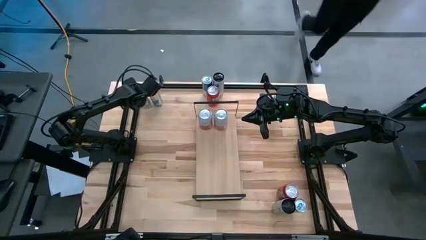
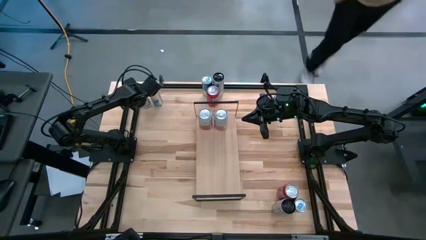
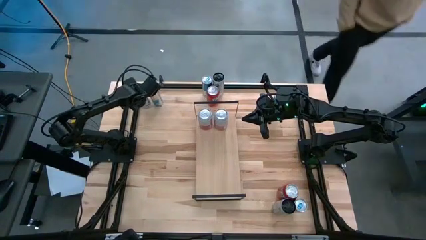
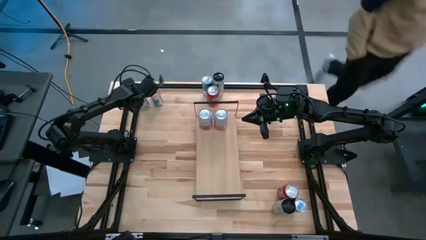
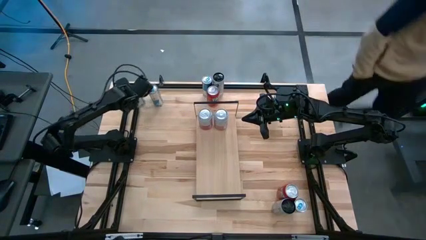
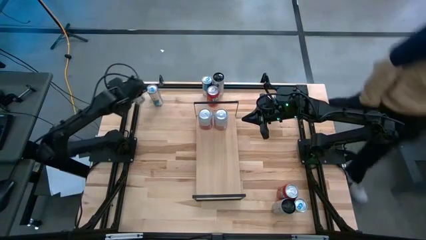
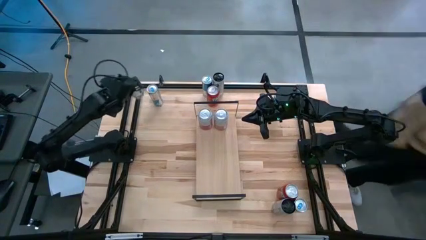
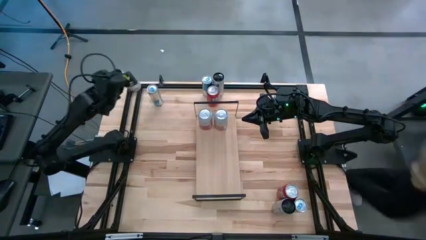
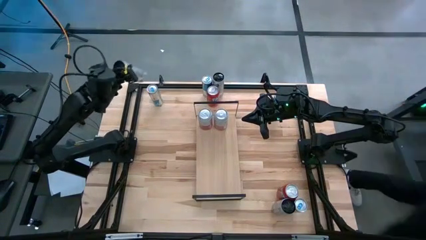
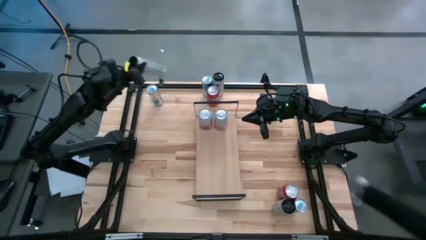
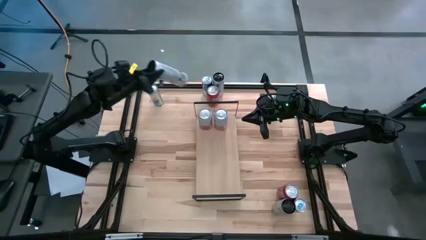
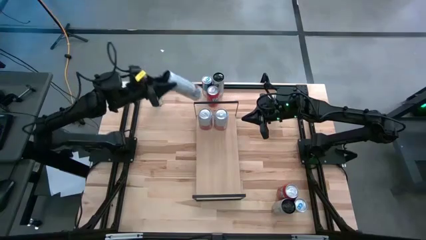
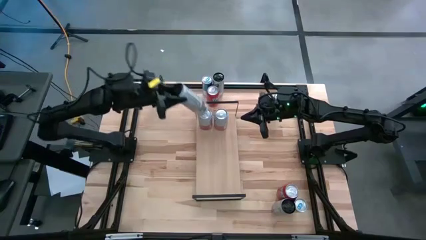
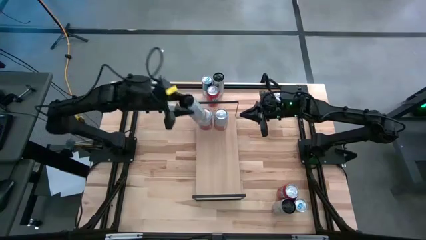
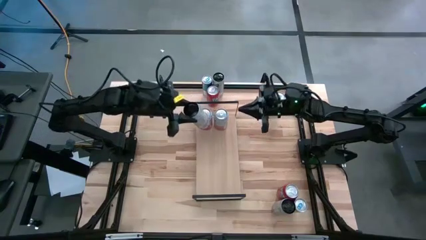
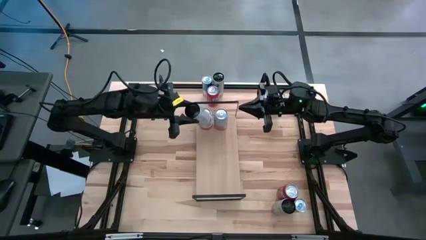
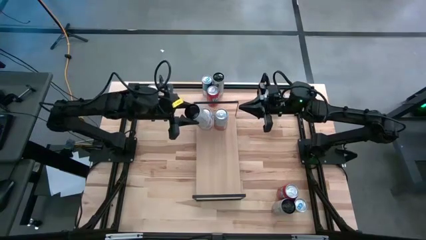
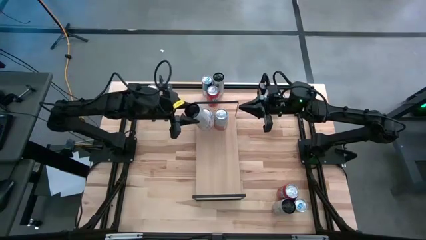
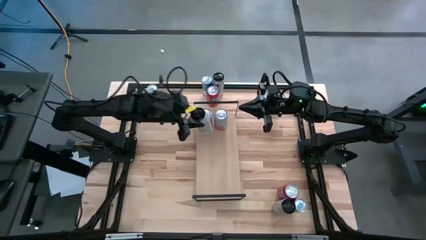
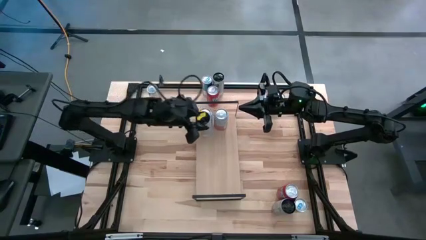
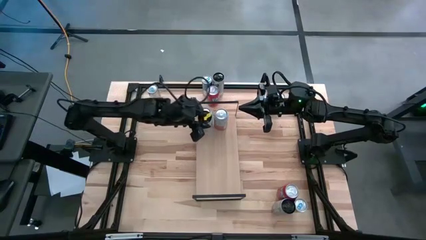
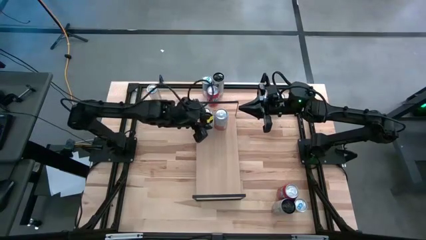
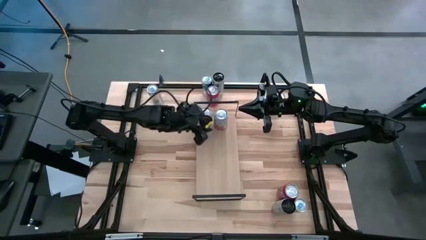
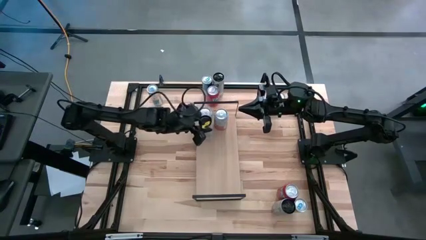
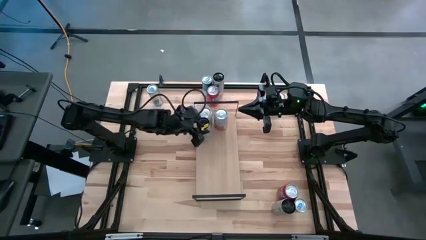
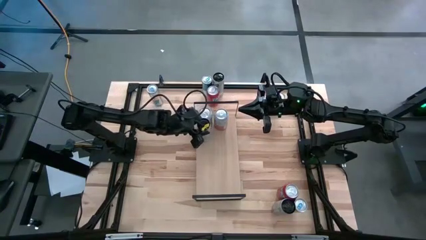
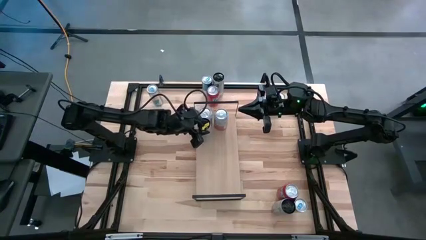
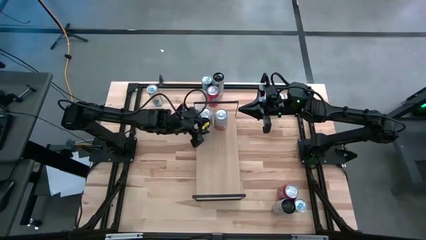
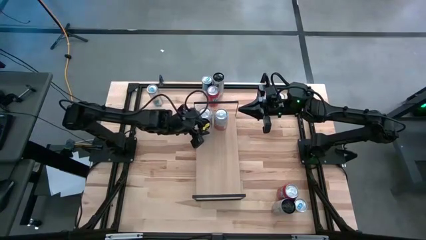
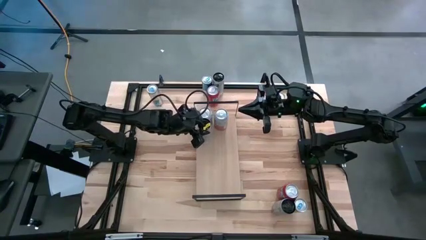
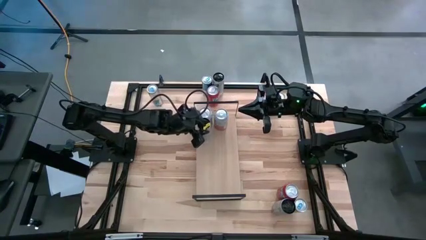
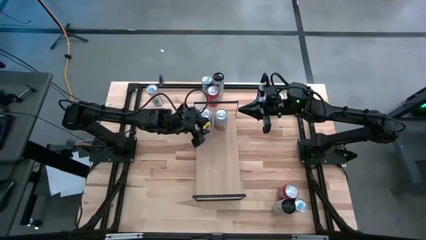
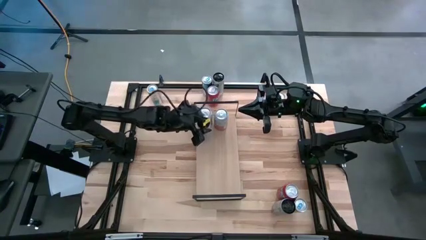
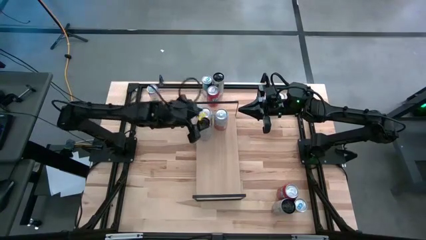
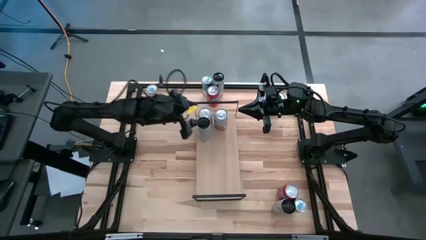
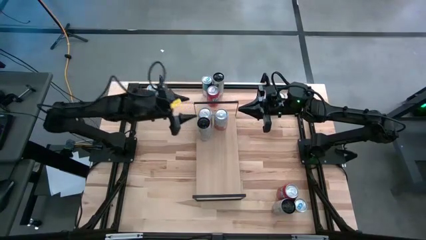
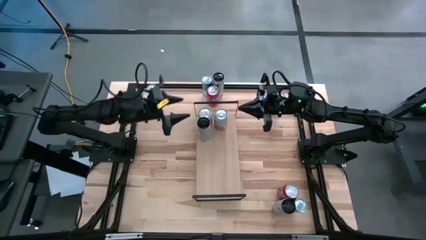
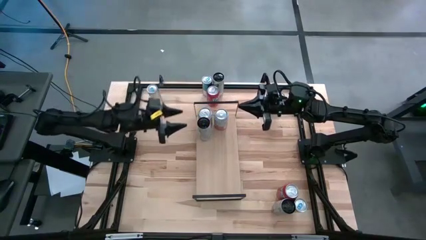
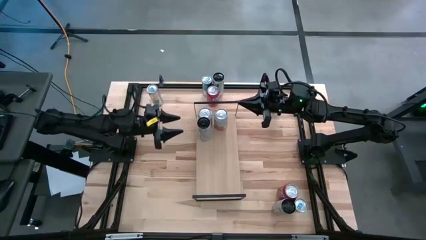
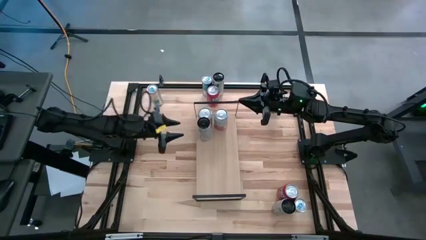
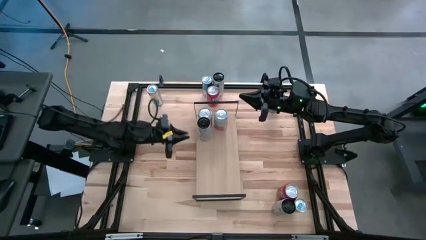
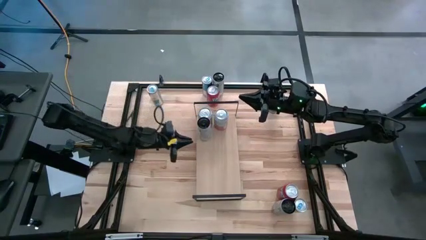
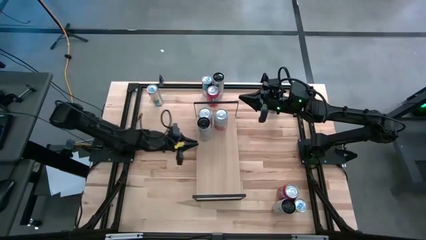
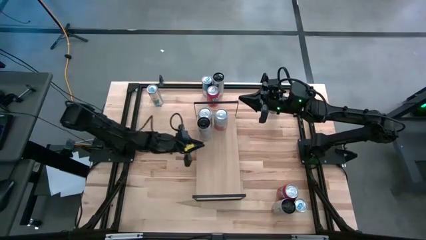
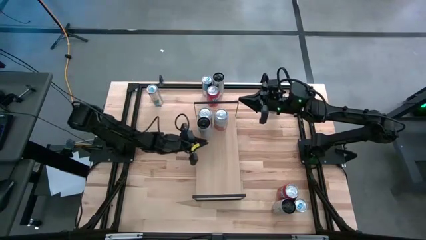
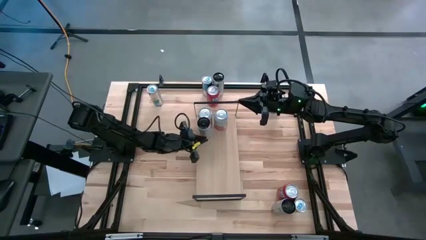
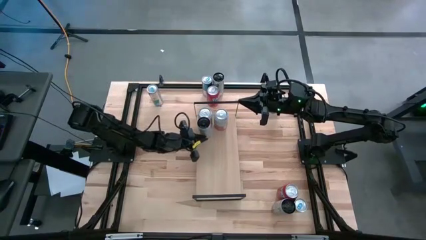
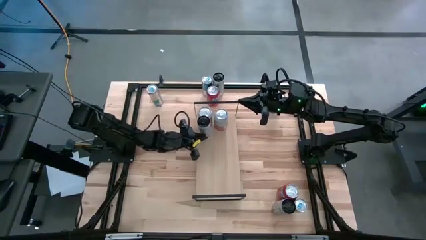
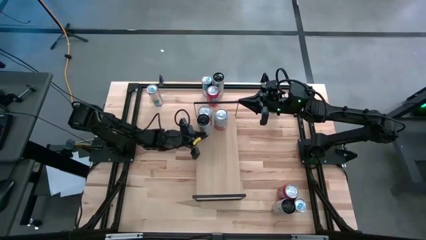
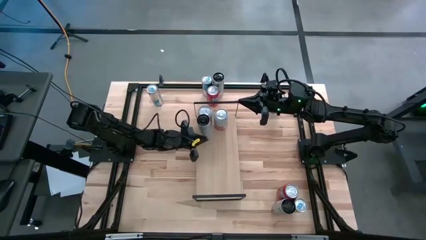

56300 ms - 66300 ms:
Task: Place canned beverage on shelf
Put the left white pink soda can on the shelf

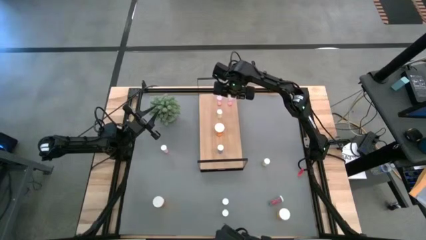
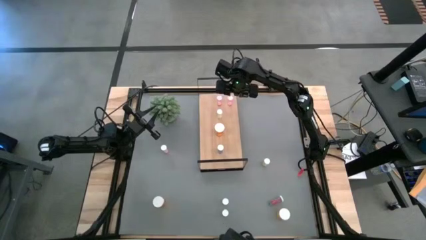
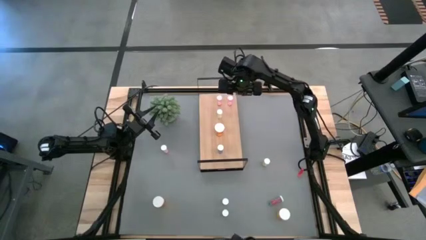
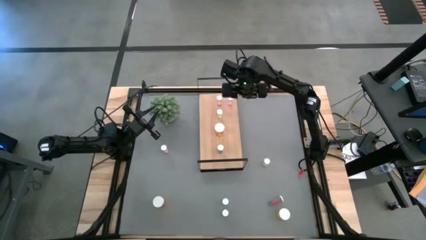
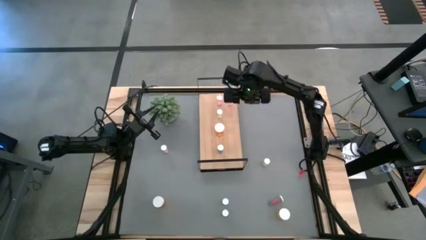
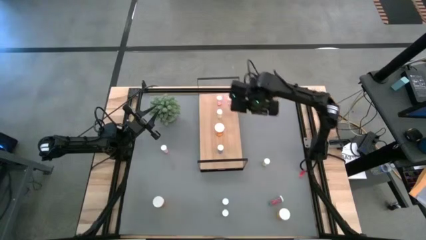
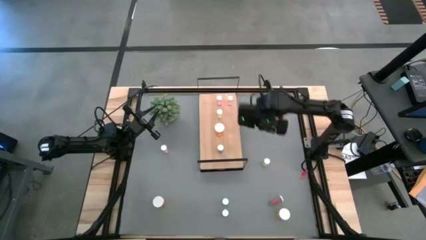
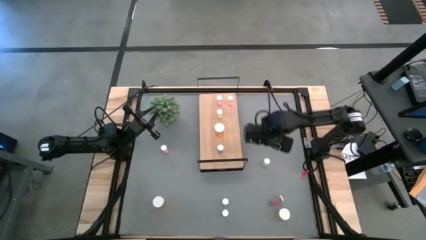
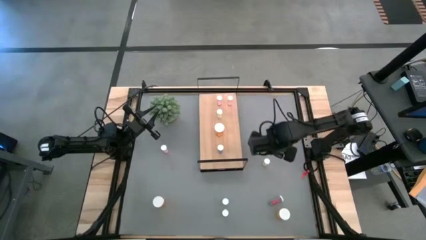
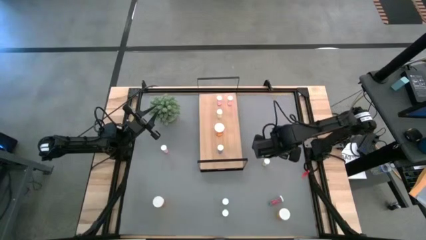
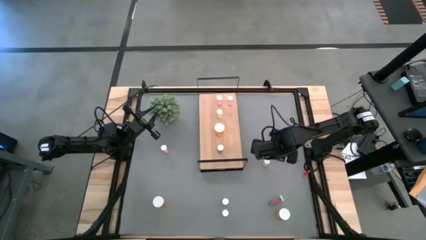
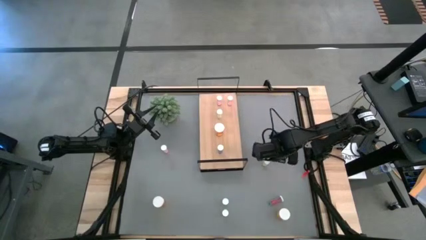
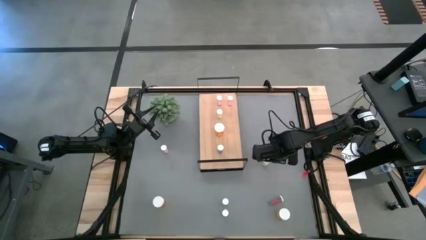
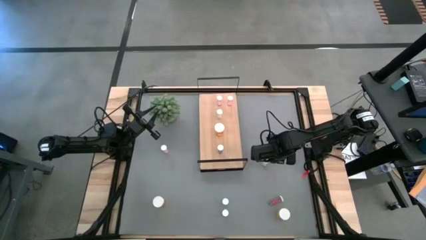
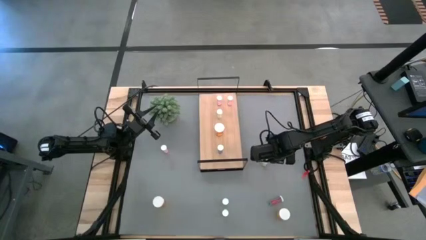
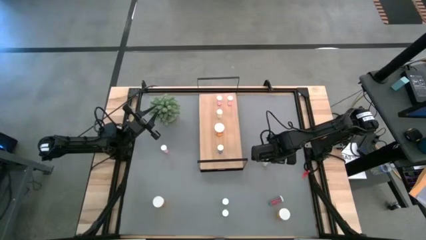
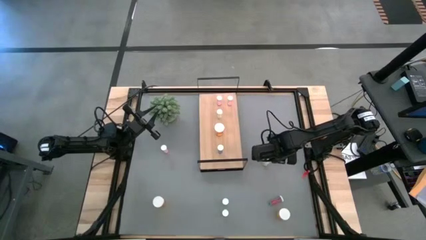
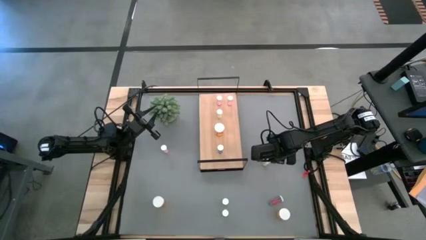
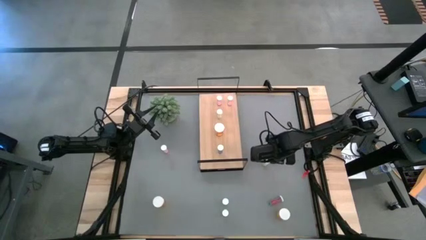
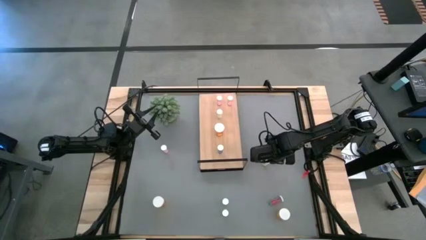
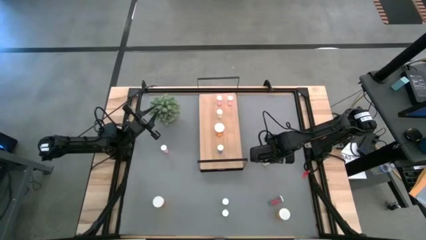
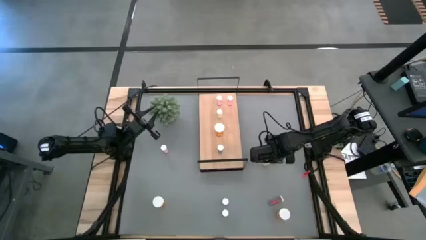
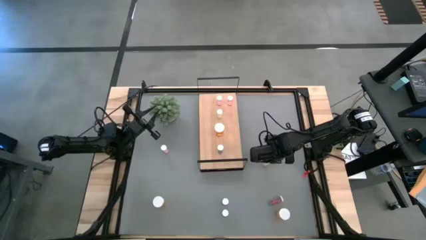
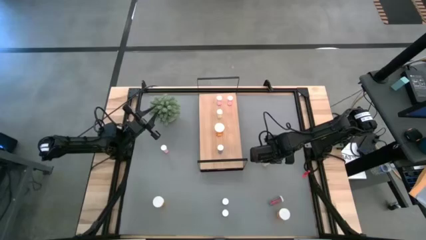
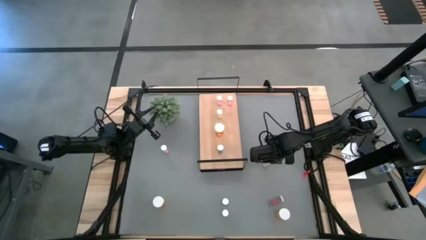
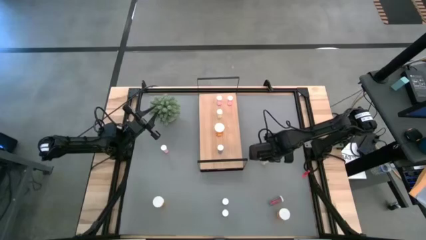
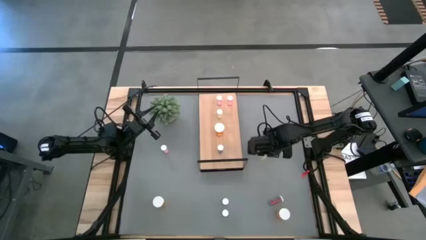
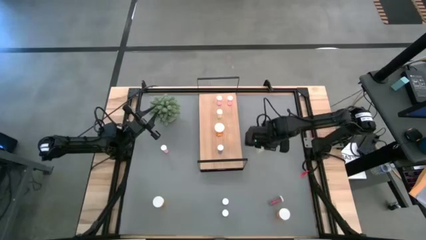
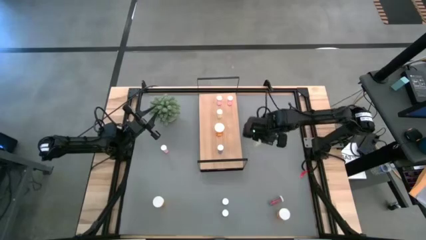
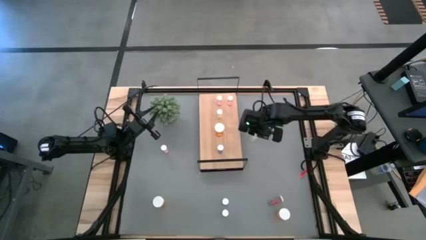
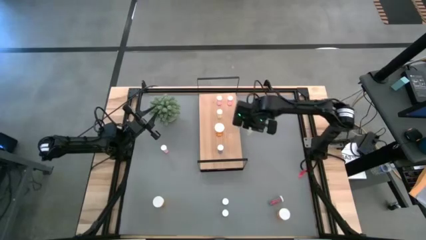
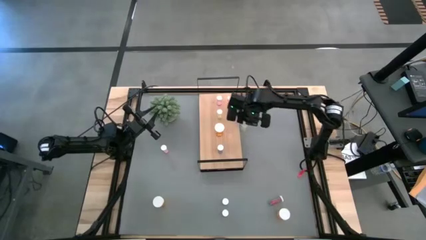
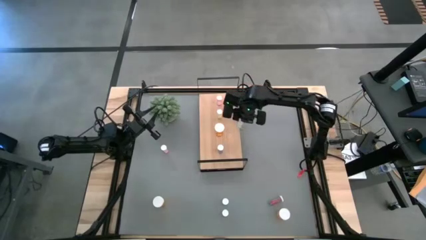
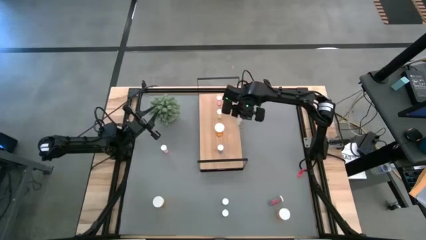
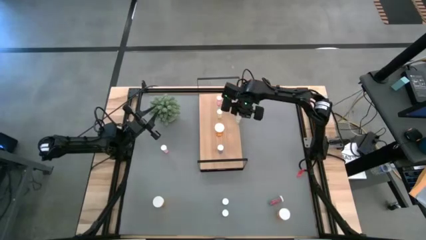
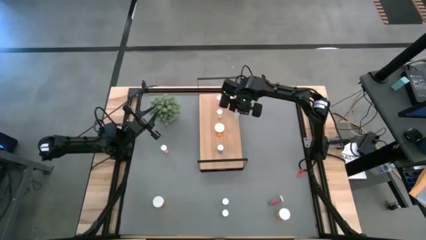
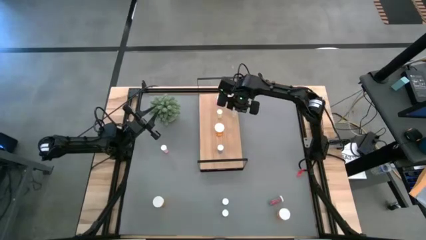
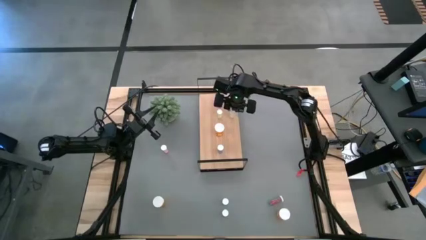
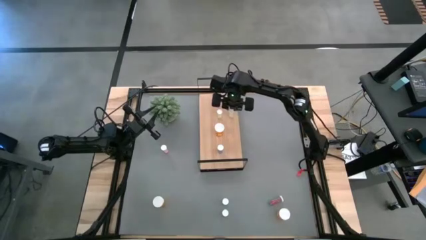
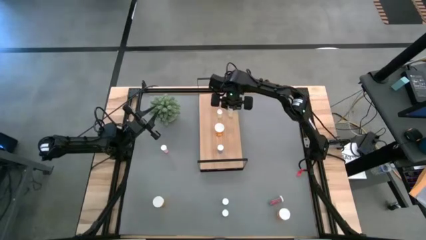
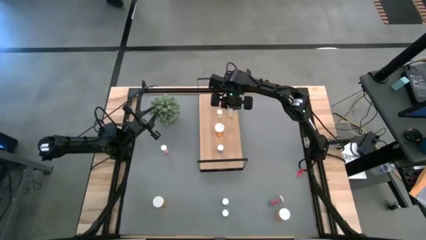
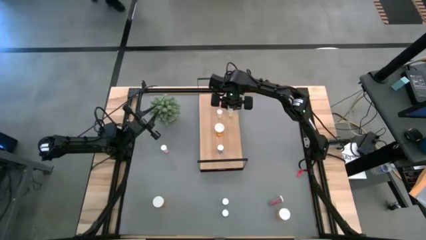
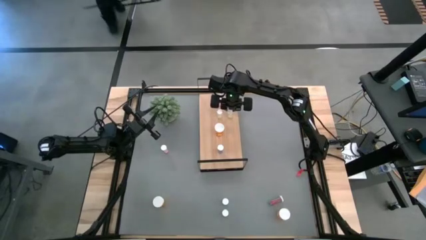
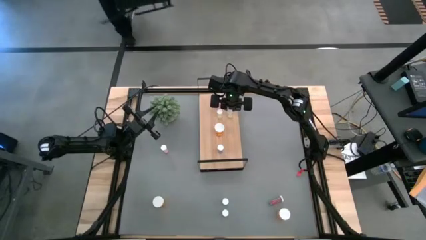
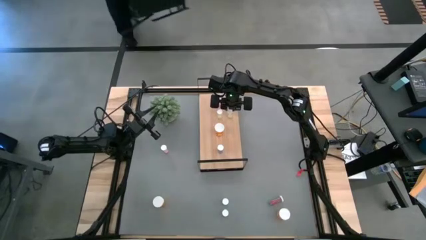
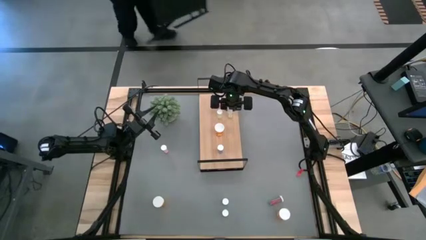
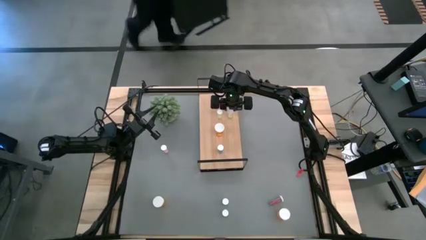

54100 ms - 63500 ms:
Task: Pick and place medicine bottles onto shelf by color
Put the top yellow pill bottle aligned with the other yellow pill bottle on the shelf
